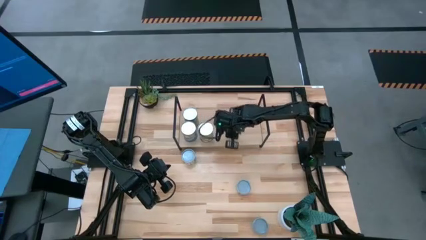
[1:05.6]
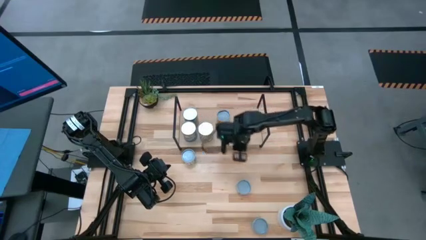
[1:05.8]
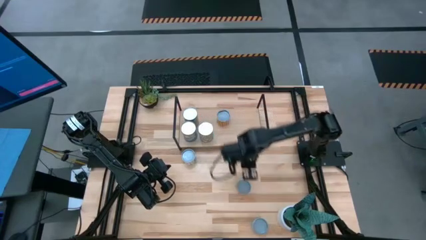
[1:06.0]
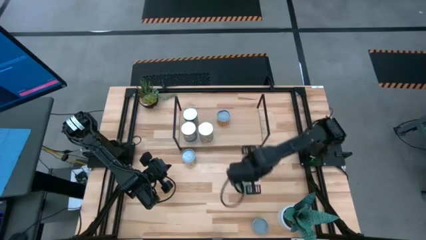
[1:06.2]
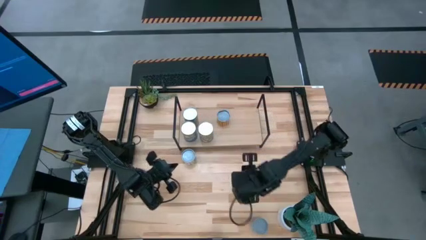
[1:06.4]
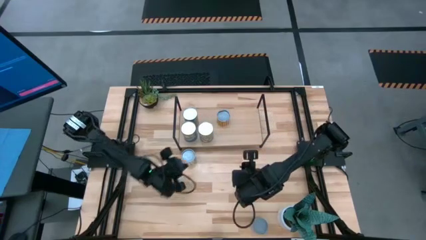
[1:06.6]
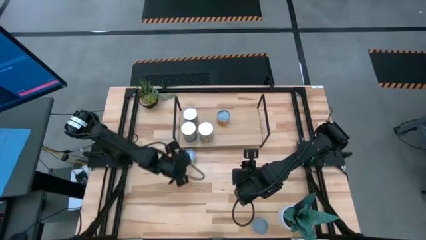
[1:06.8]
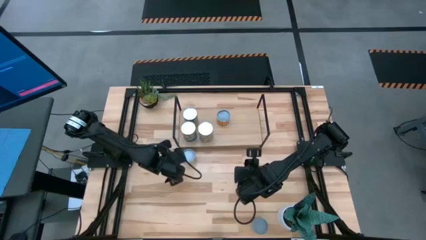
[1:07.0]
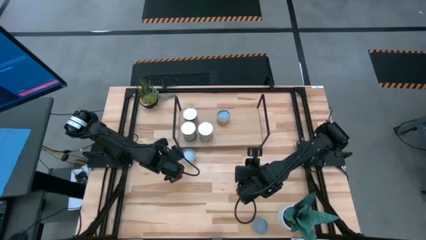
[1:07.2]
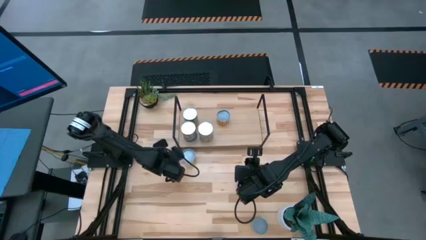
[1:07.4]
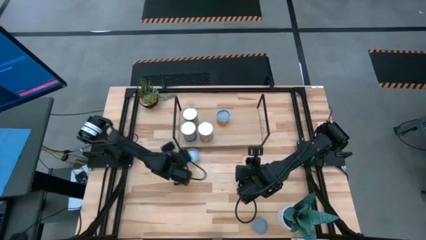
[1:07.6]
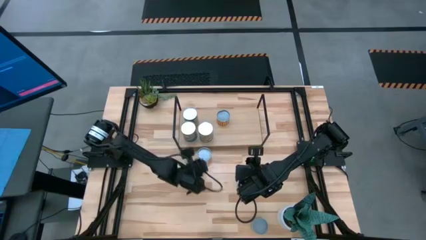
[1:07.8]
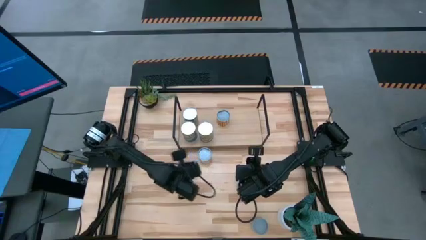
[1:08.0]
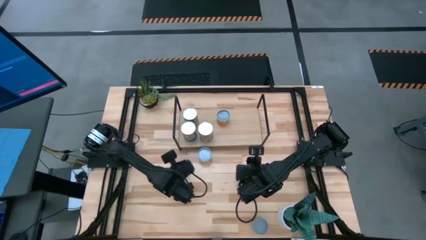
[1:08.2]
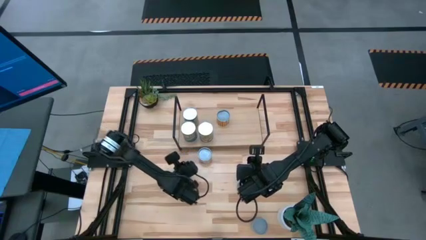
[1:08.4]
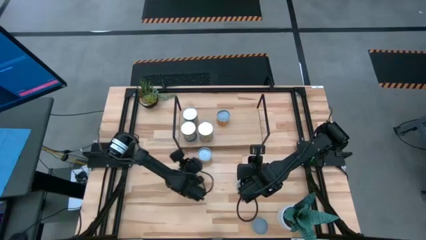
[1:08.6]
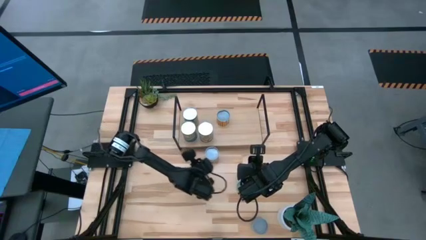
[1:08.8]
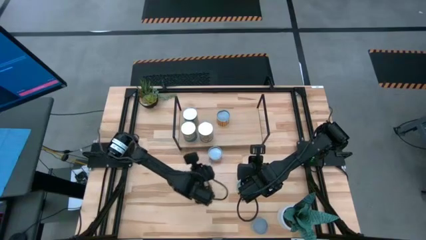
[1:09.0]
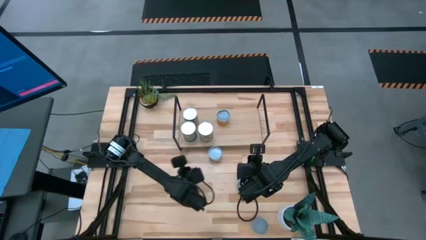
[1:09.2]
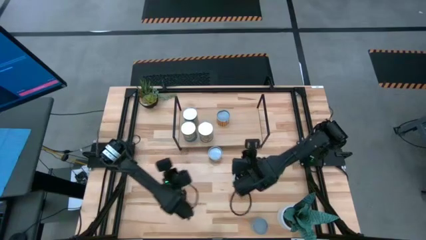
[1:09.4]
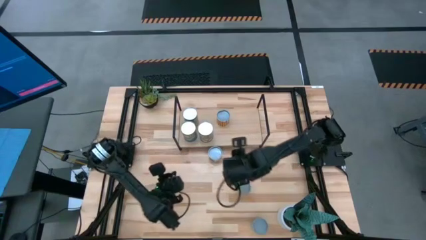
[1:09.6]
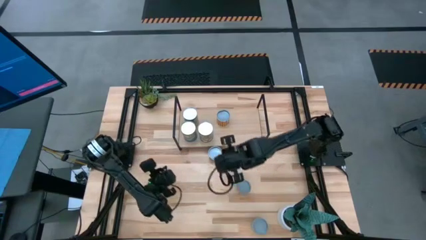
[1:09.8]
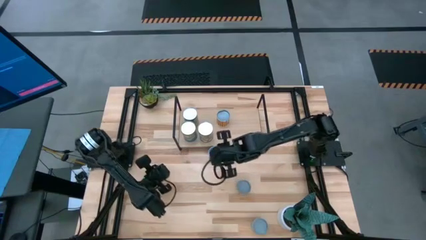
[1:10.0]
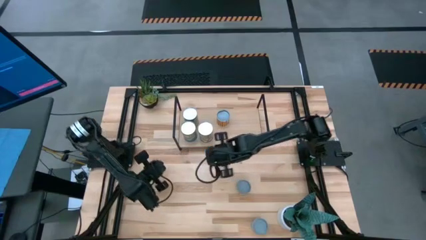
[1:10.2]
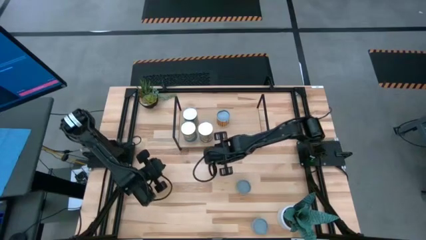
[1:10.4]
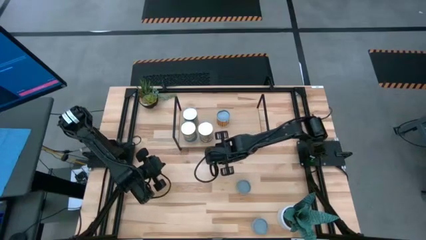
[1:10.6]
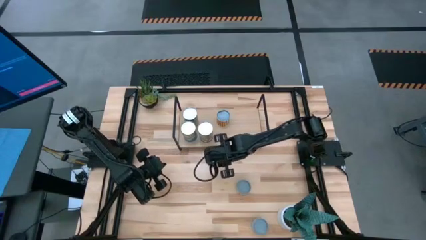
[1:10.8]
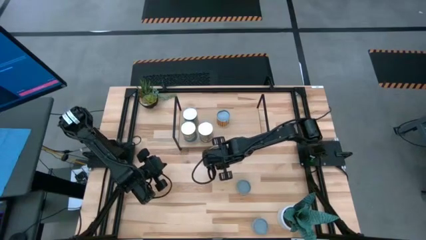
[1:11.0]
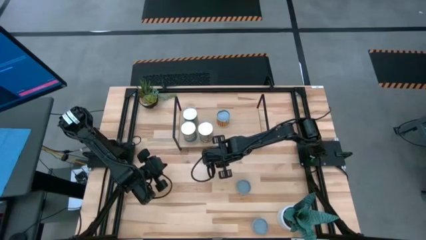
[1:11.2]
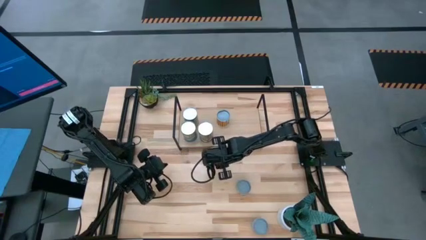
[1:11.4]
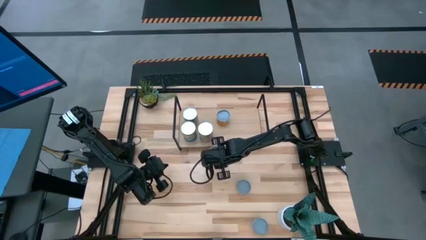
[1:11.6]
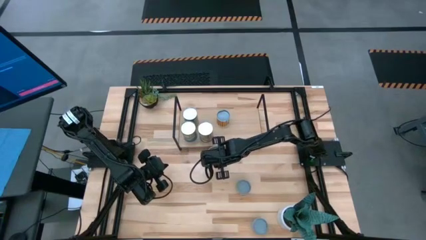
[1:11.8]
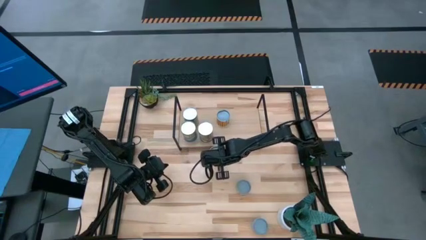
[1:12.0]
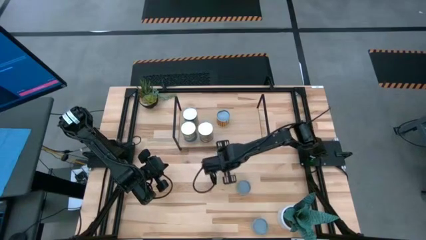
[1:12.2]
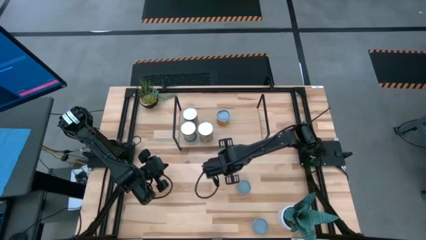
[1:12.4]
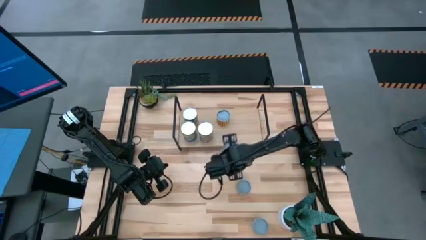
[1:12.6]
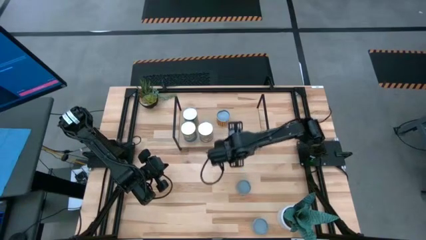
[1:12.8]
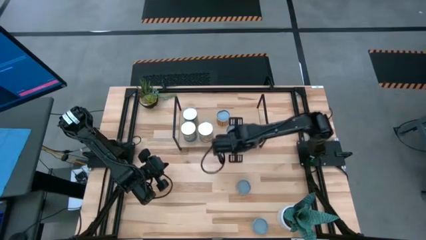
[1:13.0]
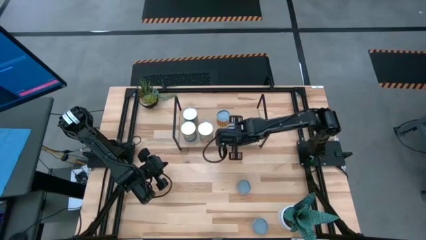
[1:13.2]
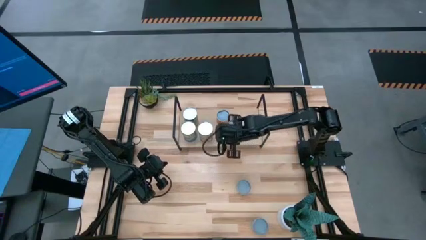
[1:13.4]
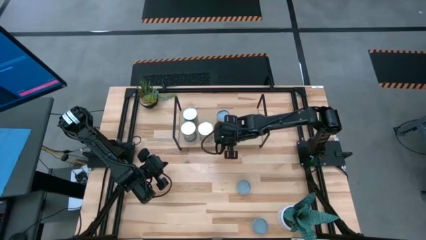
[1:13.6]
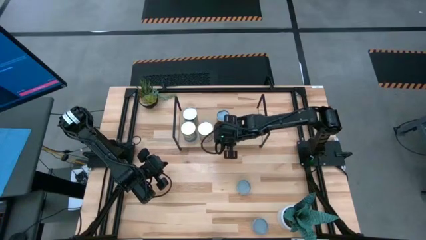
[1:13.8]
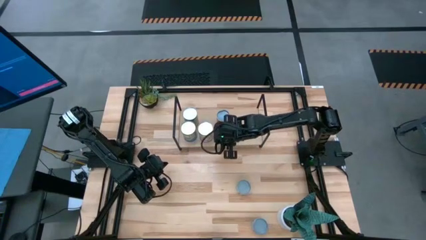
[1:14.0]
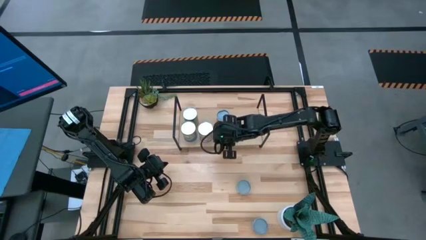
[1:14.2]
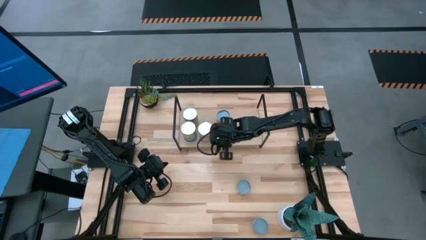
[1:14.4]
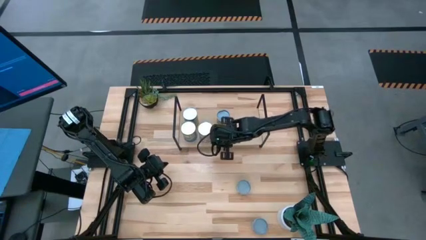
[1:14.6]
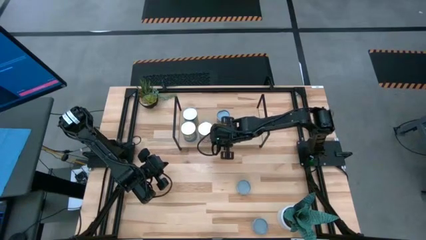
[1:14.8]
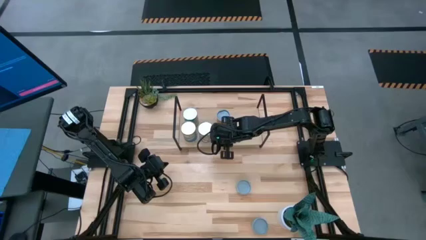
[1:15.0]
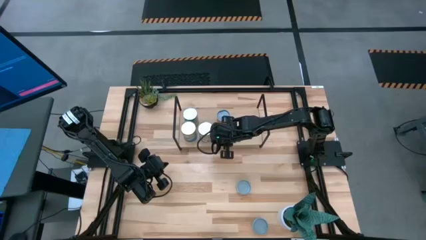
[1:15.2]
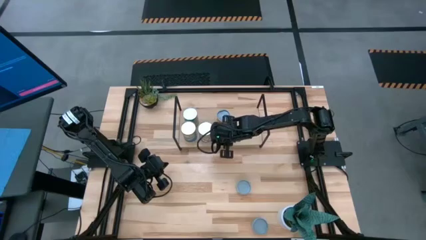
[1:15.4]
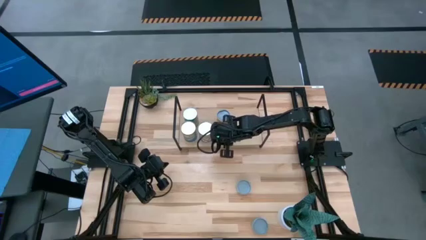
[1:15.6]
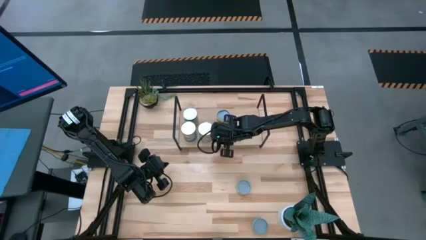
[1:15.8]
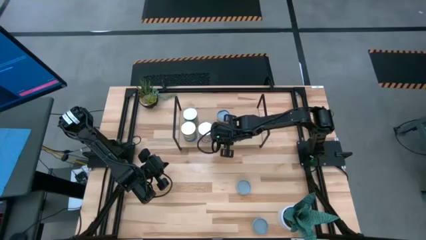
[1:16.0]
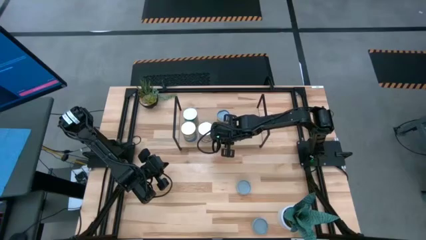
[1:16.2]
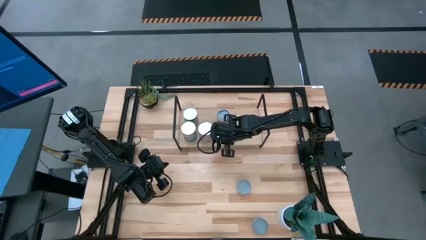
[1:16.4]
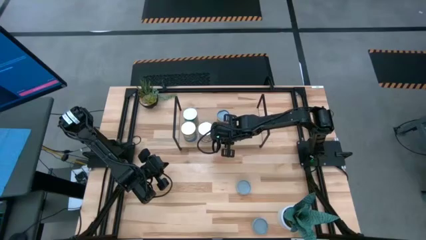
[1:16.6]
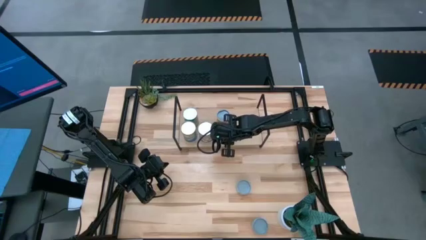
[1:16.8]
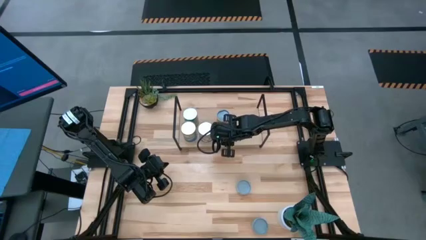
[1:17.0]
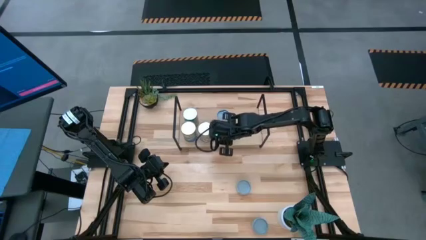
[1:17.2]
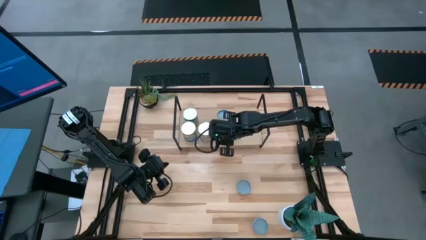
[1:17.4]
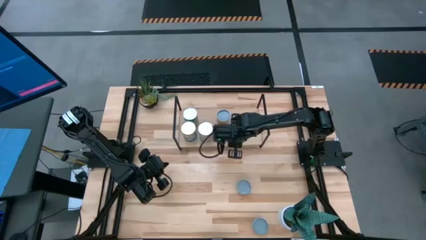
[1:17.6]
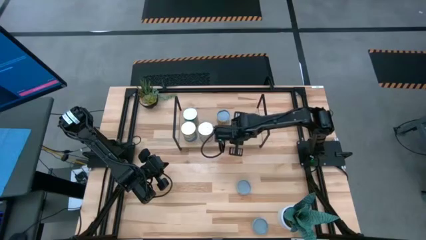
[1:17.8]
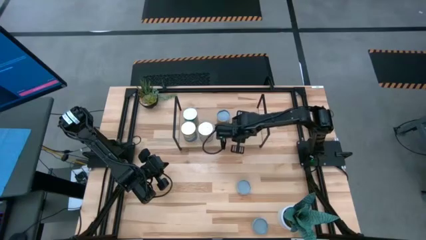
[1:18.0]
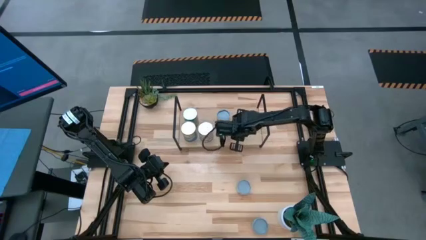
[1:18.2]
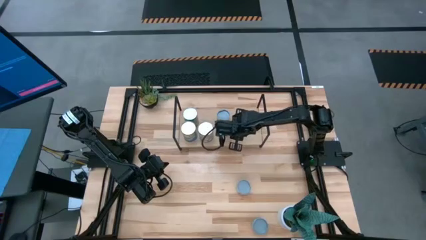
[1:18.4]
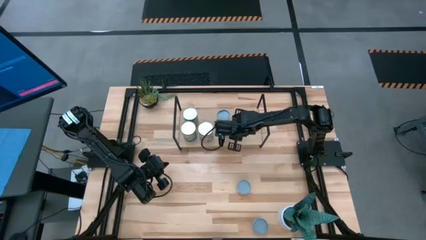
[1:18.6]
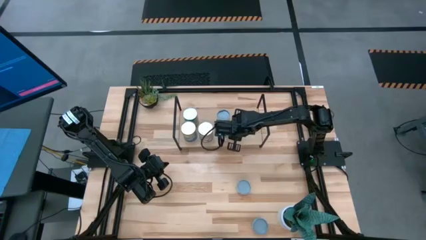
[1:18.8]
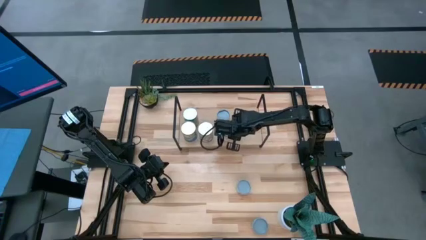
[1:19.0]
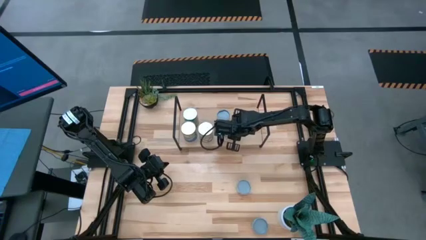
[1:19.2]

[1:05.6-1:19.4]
Task: Pick and place cans onto a shelf
Put the canned green peas on the shelf

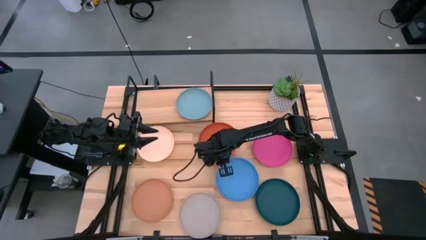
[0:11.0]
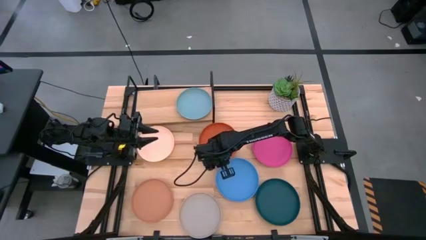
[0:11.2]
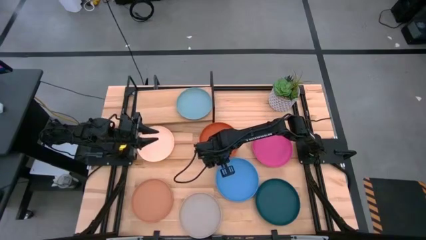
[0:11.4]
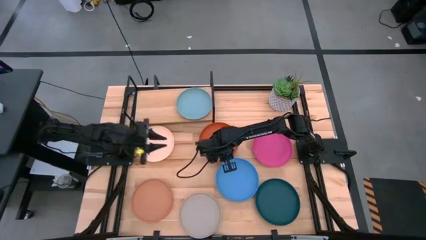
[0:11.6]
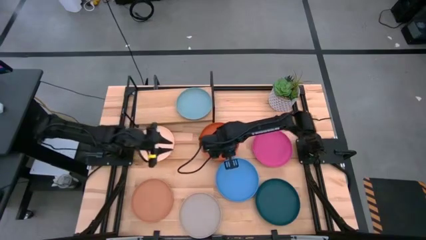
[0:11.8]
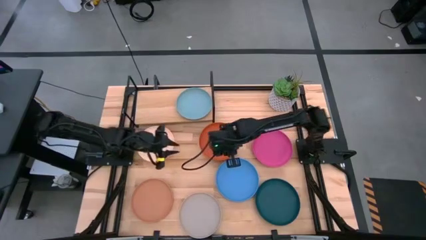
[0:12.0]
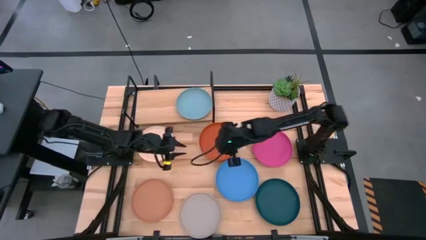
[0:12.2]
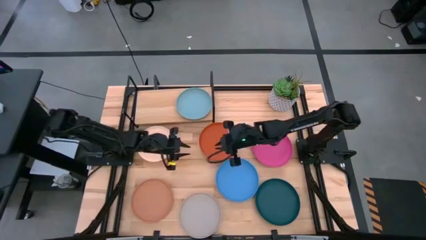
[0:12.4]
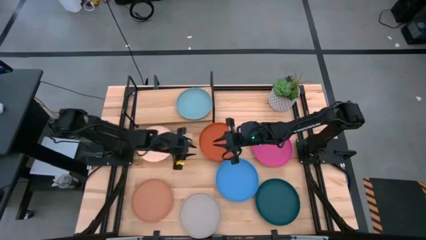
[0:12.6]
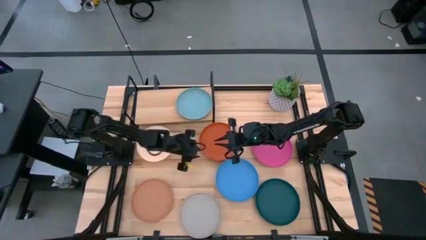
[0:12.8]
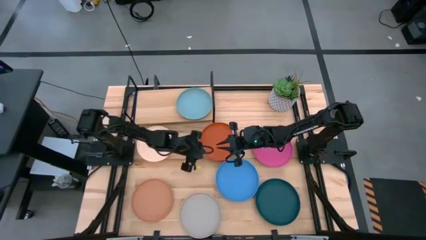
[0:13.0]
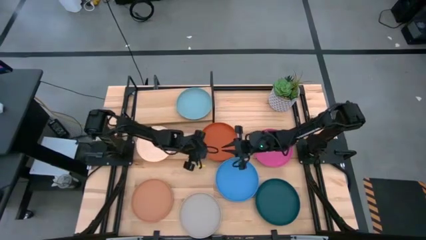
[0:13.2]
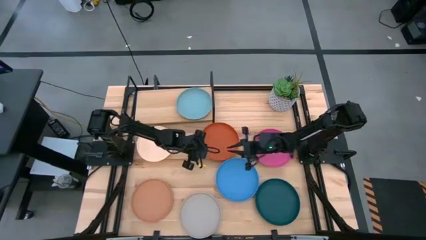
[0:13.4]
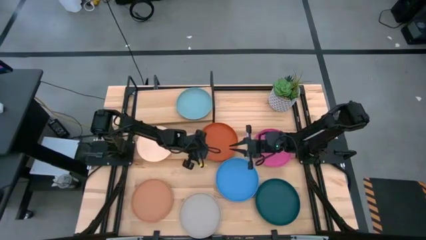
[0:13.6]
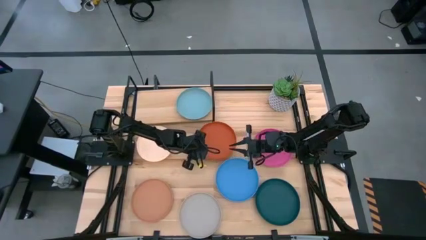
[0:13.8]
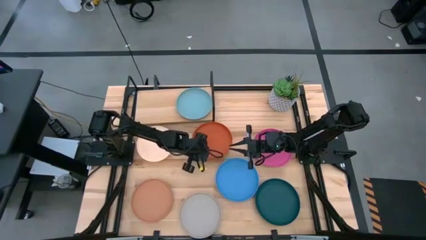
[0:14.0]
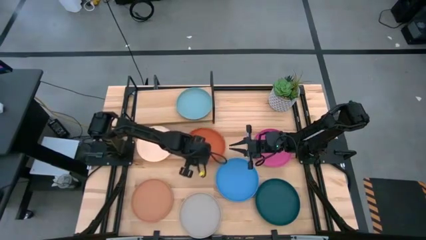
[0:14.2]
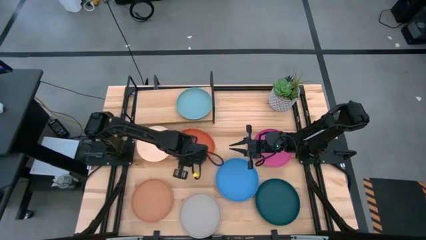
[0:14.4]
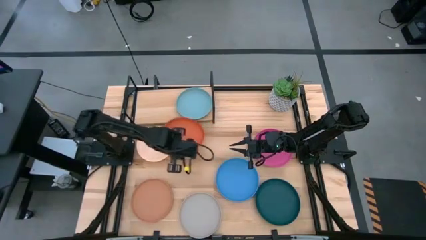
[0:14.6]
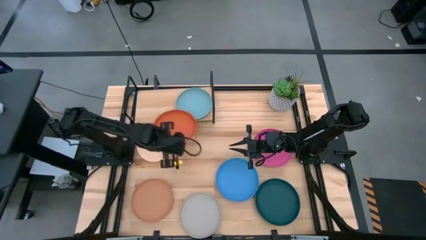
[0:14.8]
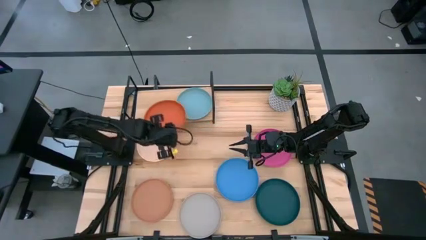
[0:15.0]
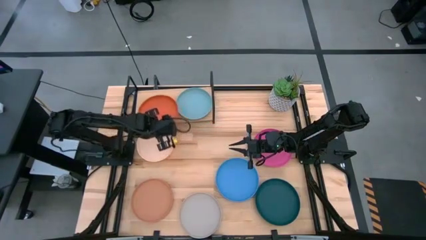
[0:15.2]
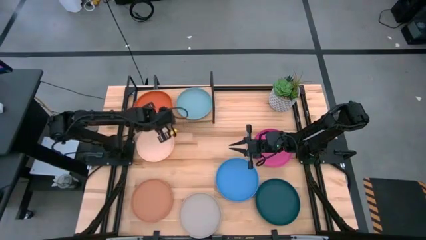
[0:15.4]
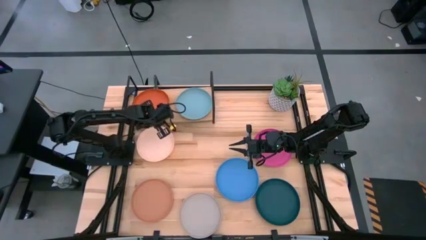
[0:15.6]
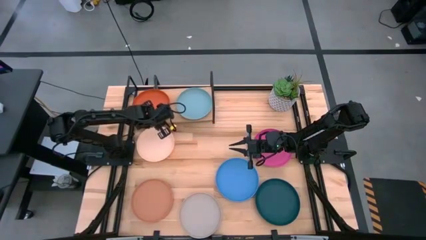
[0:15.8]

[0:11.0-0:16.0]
Task: Place and stack plates onto a shelf
Put the orange plate on the shelf
